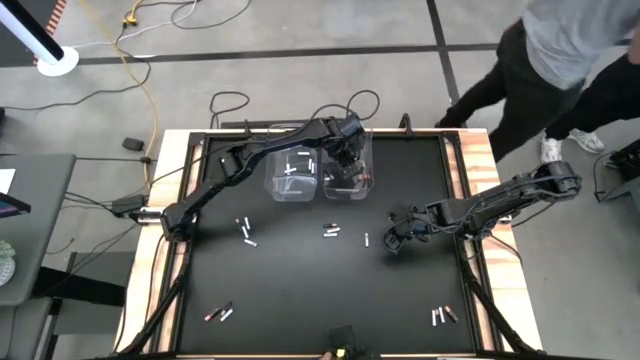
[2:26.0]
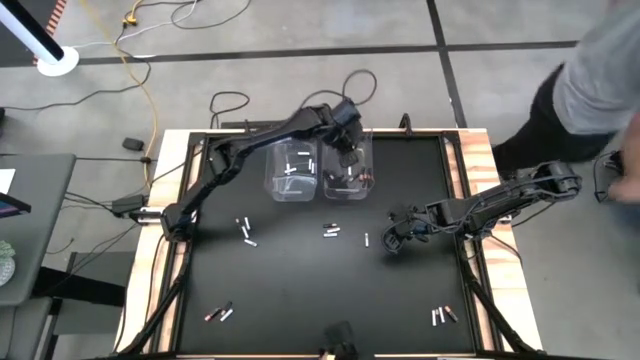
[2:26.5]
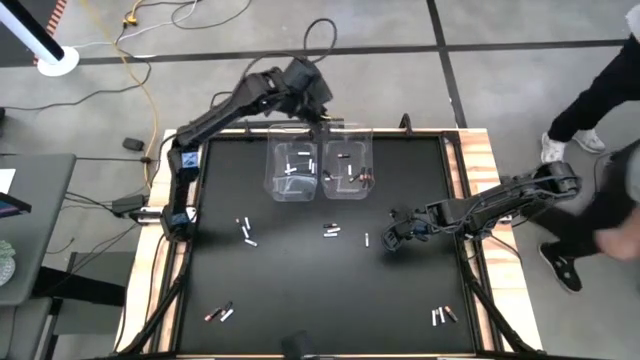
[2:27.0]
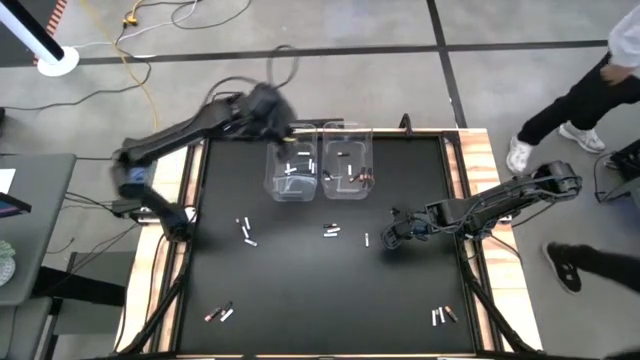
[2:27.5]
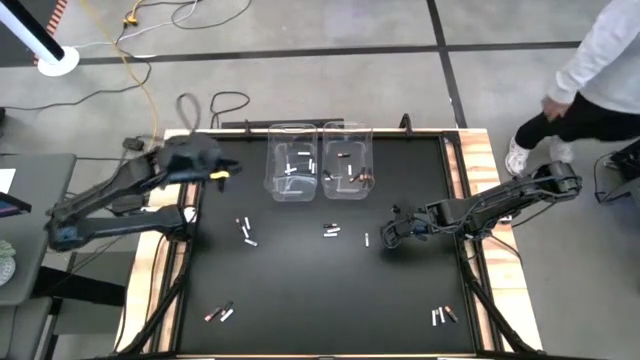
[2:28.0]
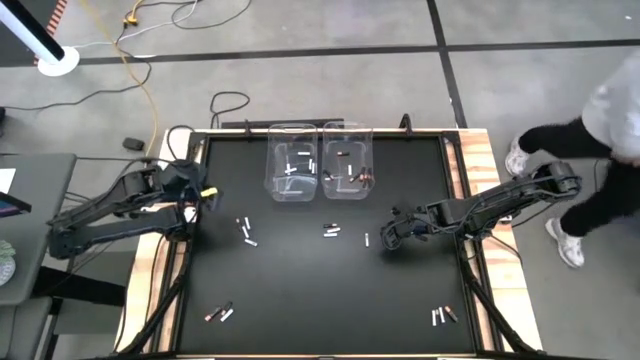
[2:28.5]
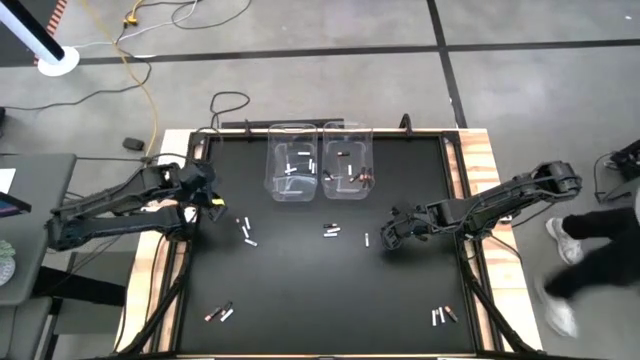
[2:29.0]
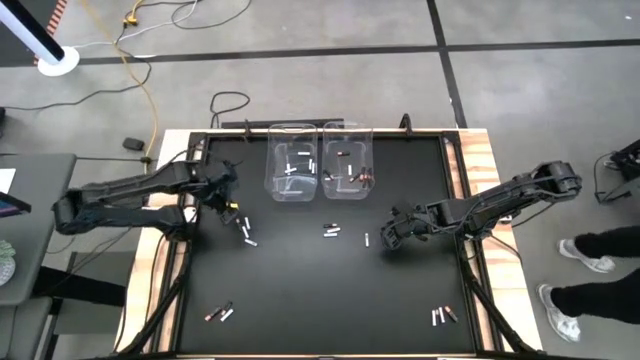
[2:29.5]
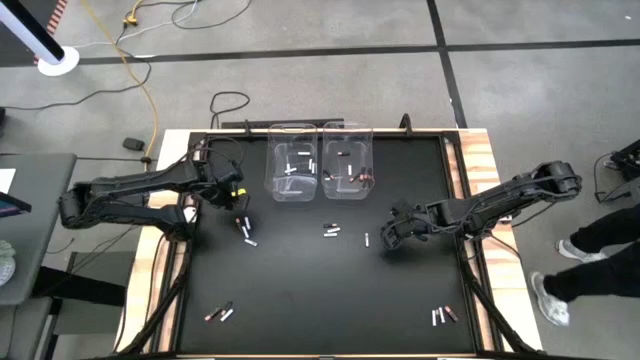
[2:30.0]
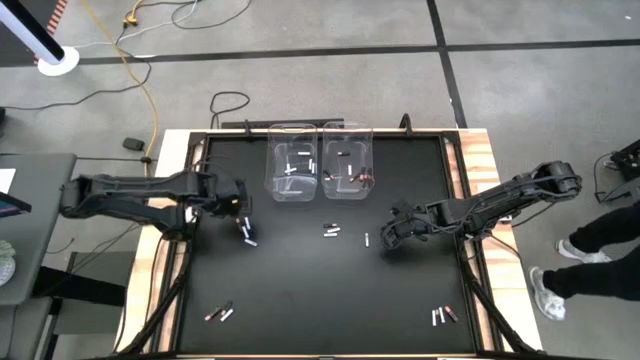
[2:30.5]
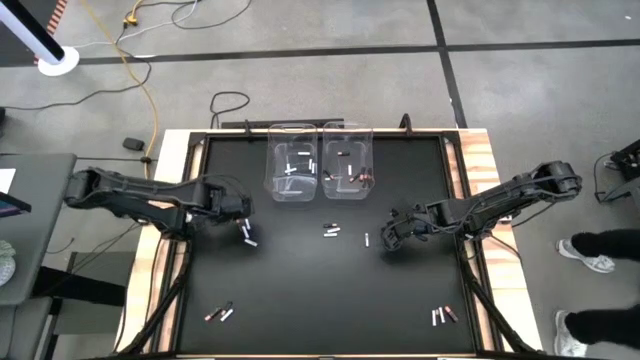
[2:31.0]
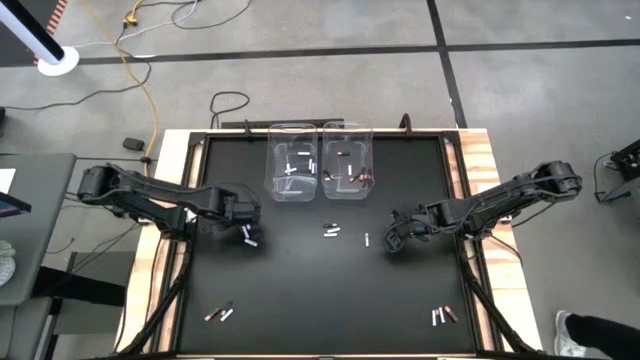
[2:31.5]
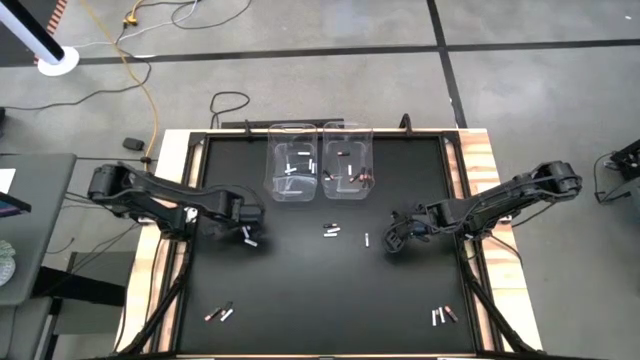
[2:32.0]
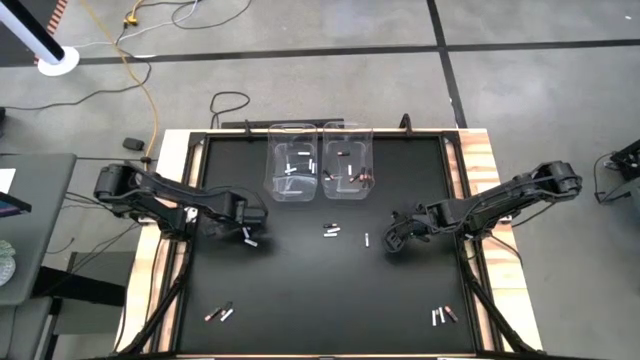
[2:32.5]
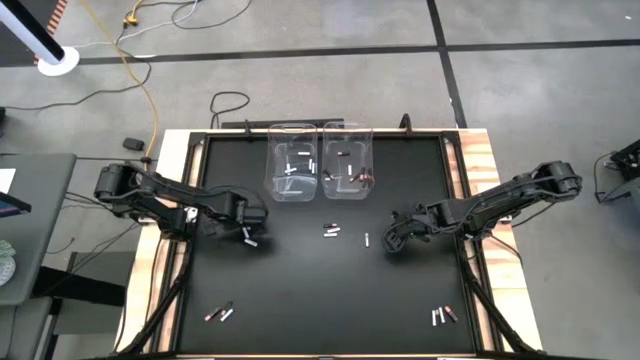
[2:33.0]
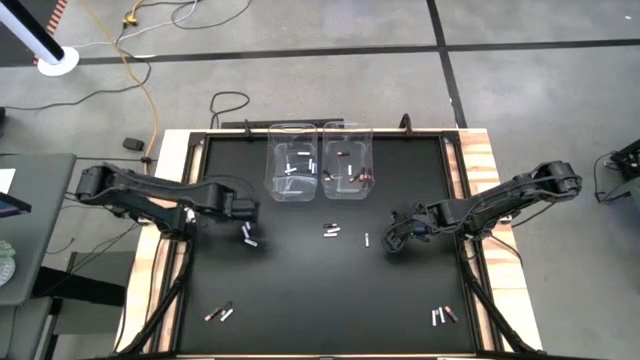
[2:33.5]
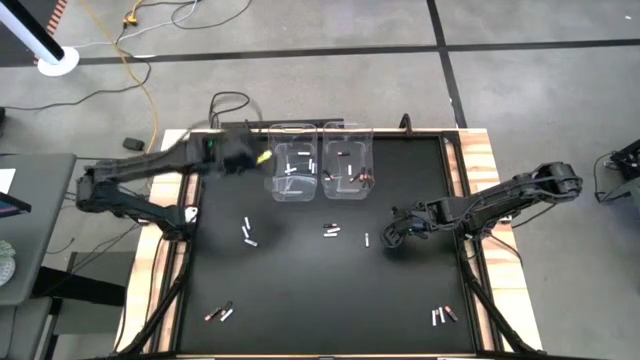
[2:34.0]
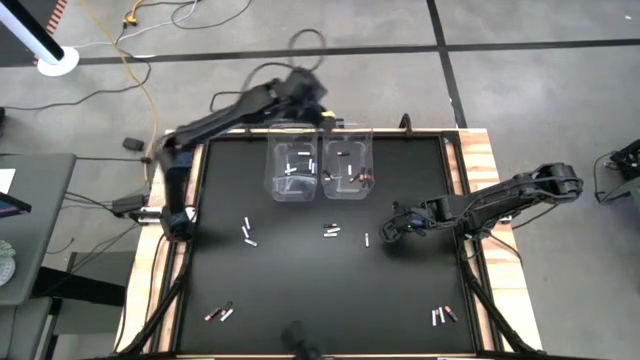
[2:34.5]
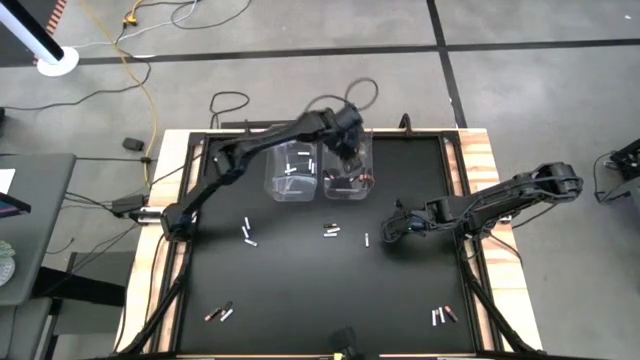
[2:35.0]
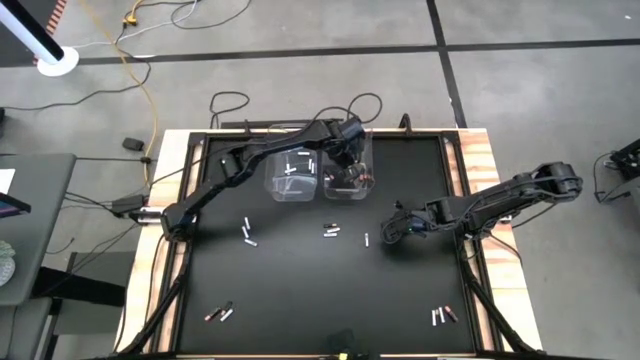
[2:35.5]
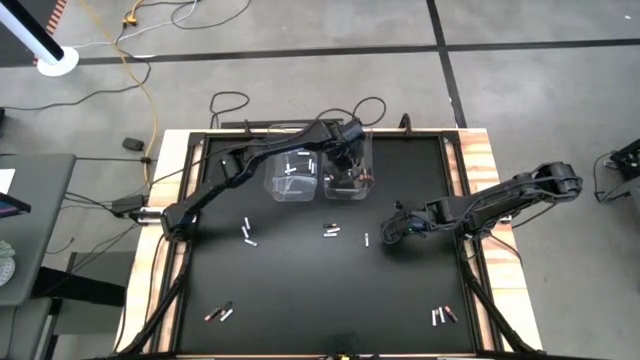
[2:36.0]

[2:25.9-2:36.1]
Task: Sort batteries
Put the black battery into the right transparent bin

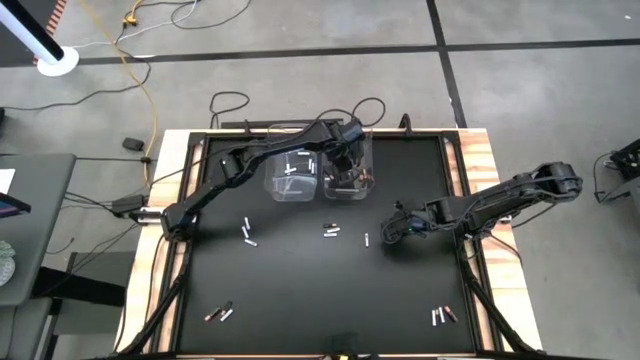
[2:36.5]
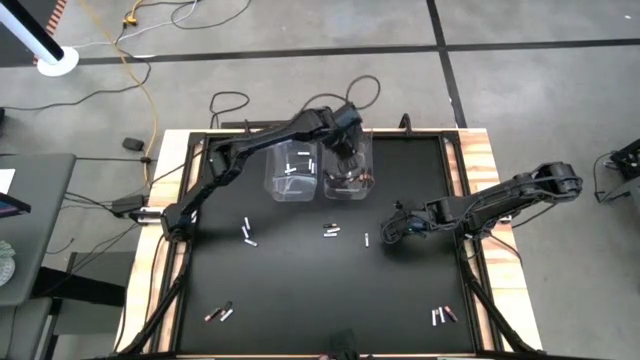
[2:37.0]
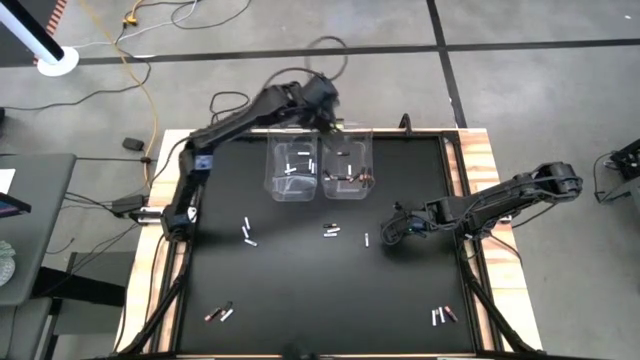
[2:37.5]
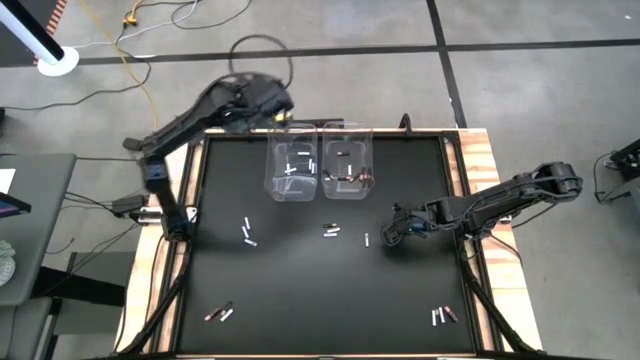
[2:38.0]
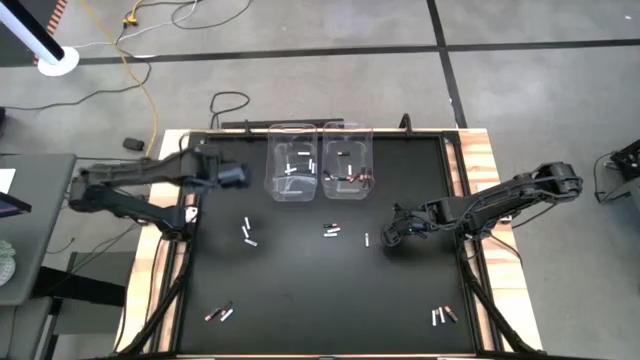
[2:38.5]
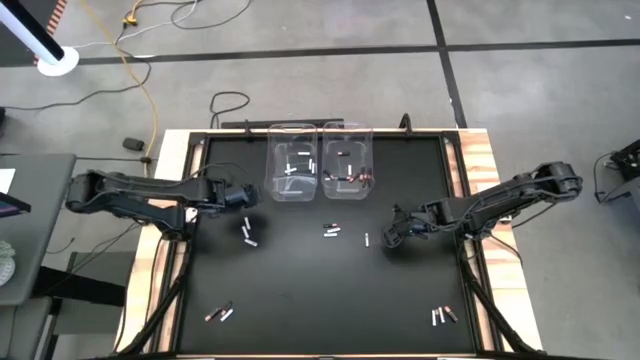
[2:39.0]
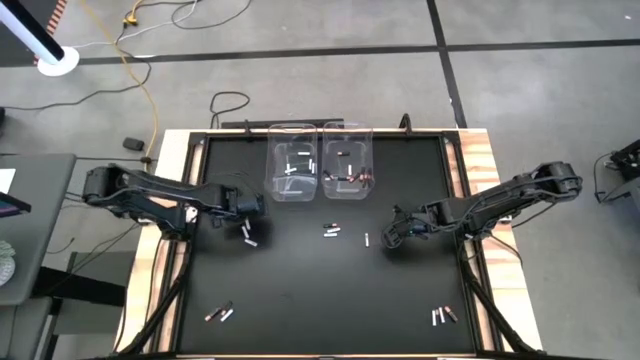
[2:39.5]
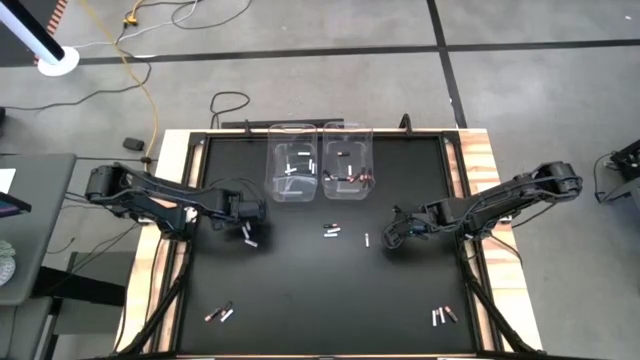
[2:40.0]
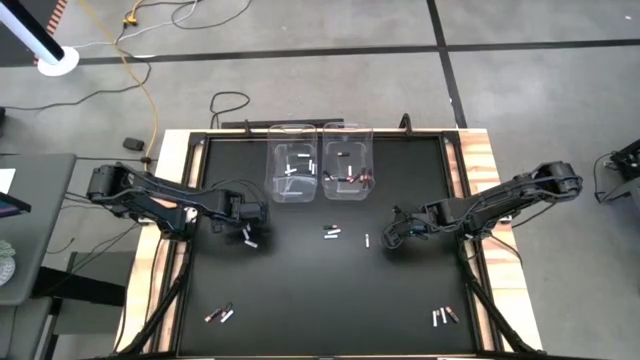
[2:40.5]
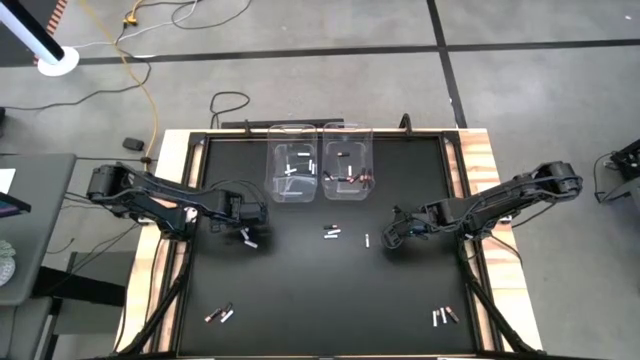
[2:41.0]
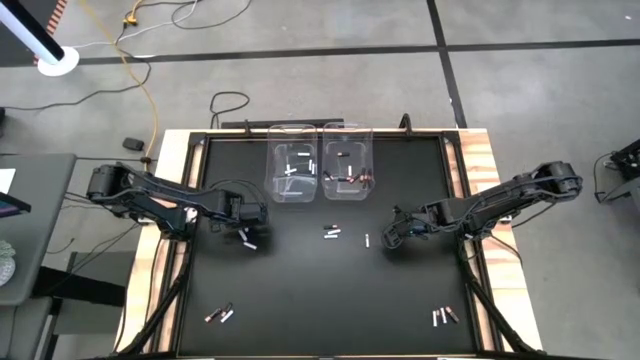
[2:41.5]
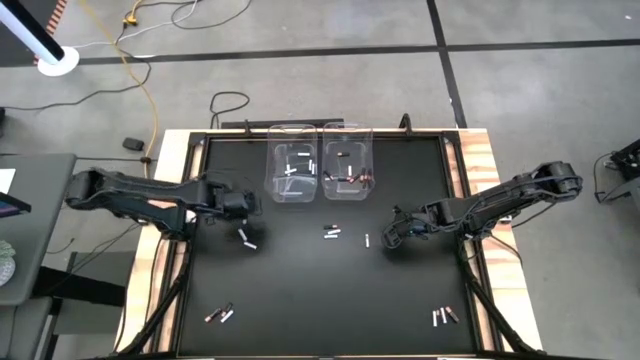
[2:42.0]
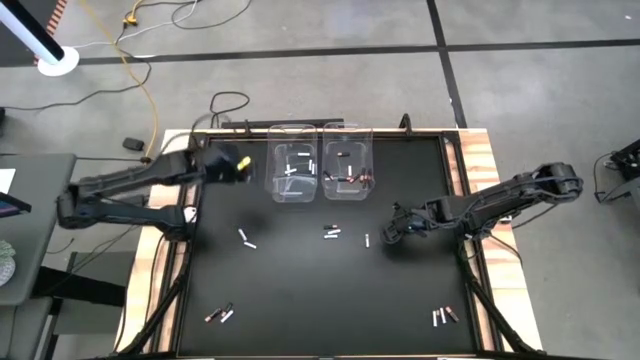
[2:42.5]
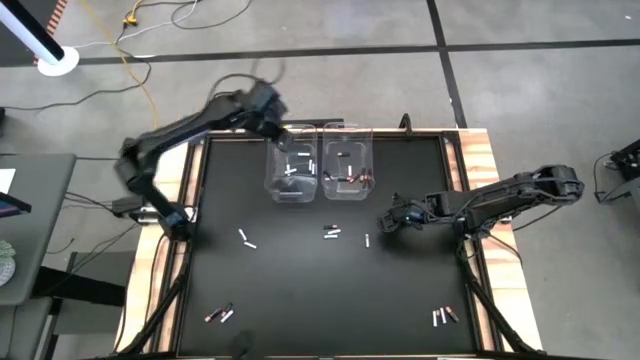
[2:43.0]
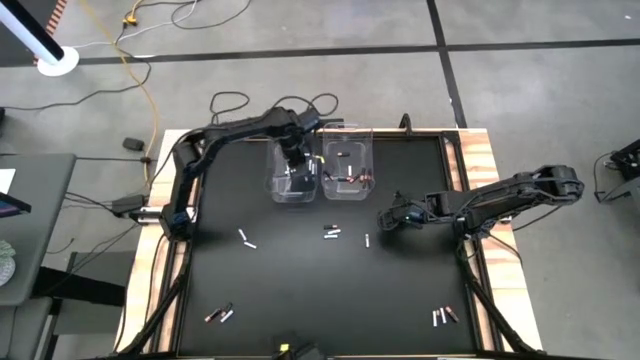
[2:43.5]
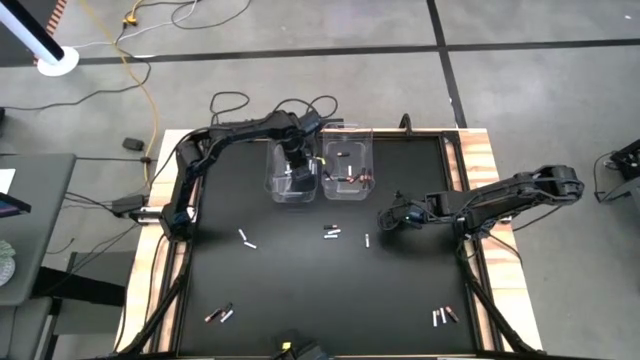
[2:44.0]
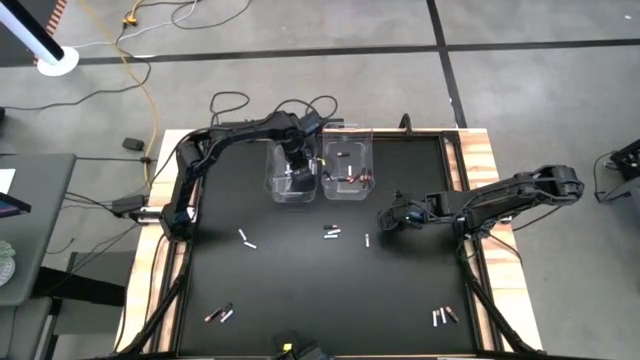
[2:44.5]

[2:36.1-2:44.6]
Put the white battery into the left transparent bin
